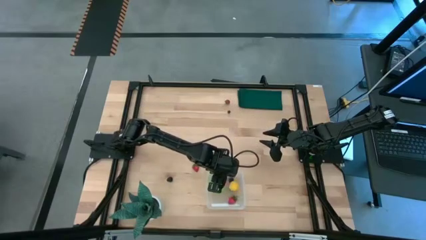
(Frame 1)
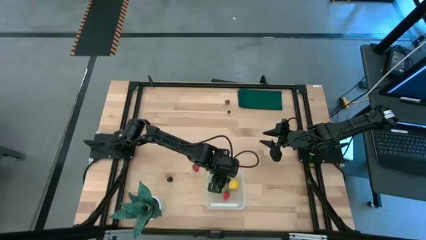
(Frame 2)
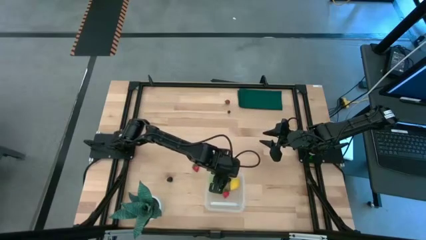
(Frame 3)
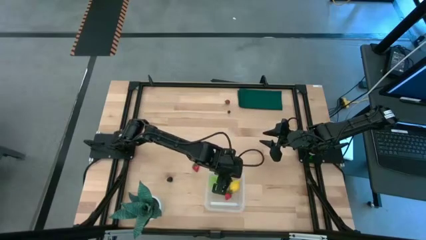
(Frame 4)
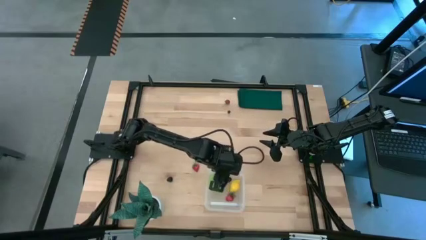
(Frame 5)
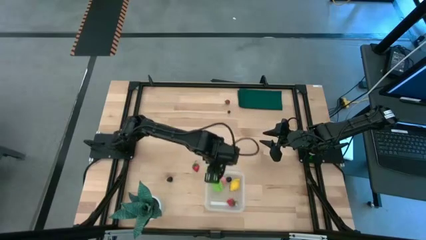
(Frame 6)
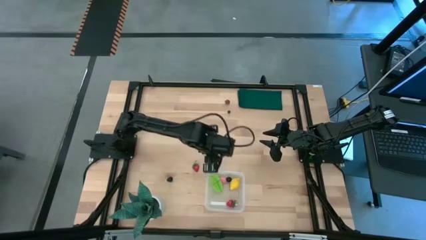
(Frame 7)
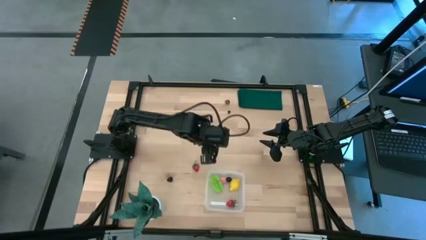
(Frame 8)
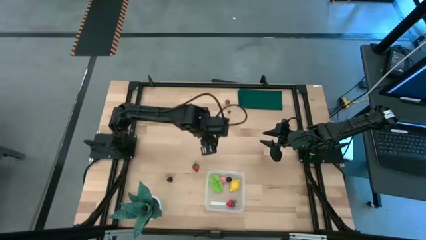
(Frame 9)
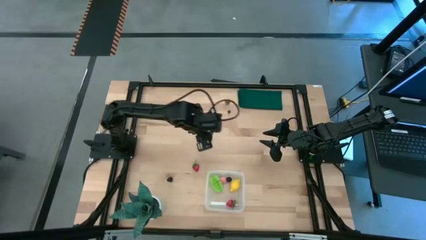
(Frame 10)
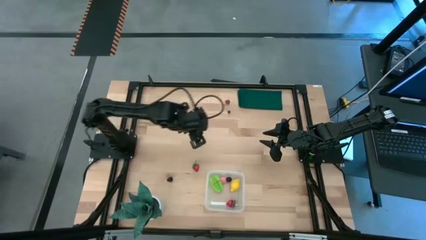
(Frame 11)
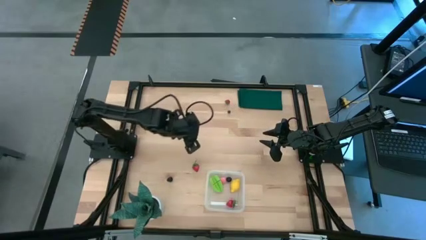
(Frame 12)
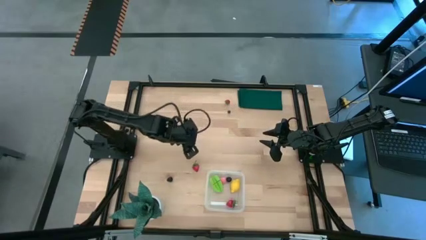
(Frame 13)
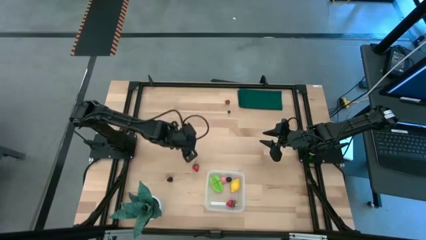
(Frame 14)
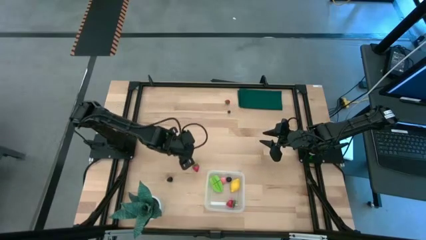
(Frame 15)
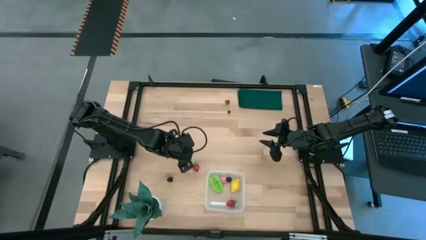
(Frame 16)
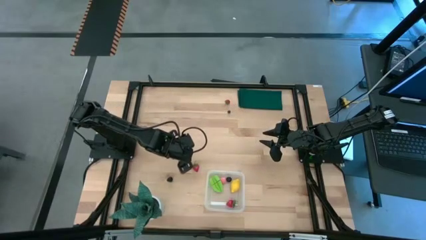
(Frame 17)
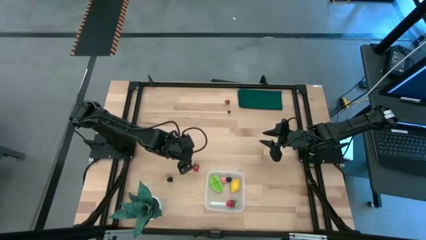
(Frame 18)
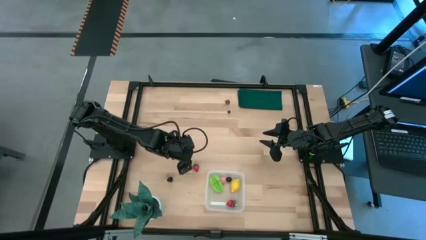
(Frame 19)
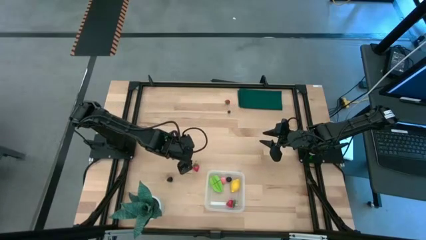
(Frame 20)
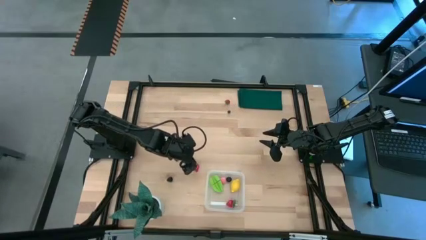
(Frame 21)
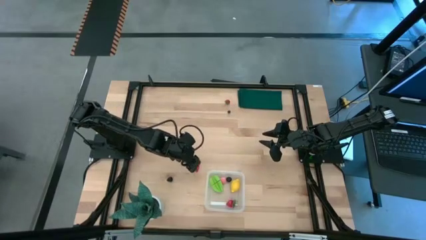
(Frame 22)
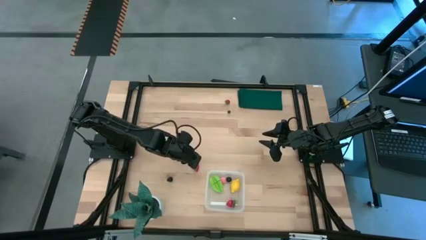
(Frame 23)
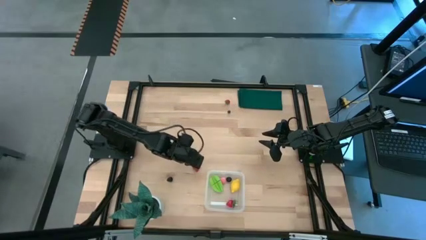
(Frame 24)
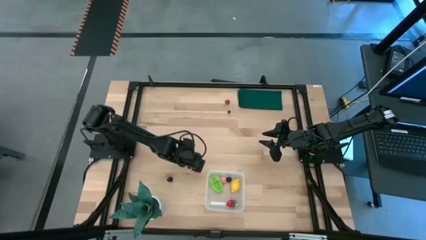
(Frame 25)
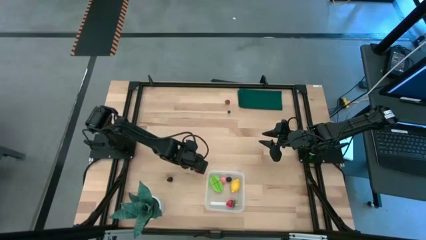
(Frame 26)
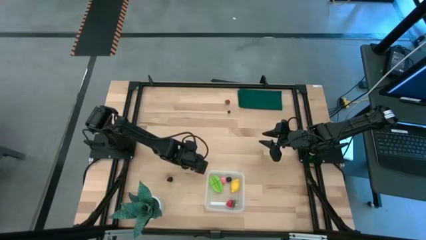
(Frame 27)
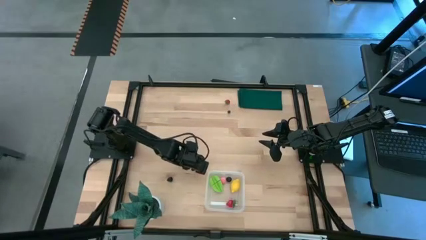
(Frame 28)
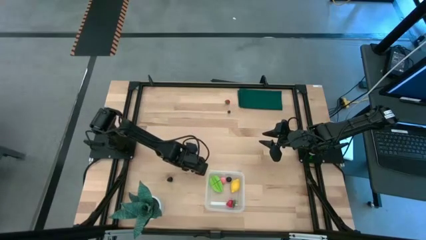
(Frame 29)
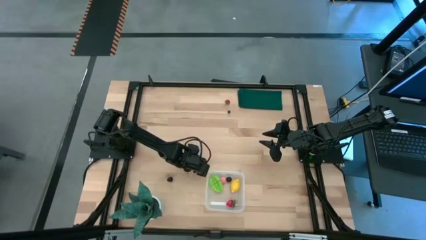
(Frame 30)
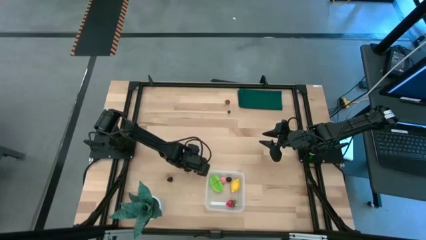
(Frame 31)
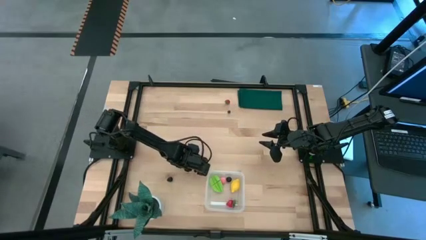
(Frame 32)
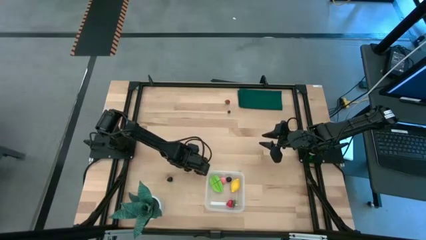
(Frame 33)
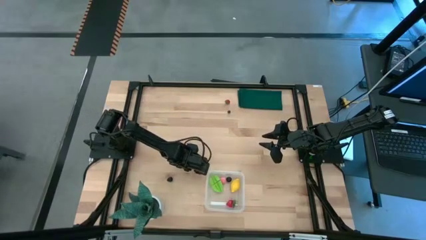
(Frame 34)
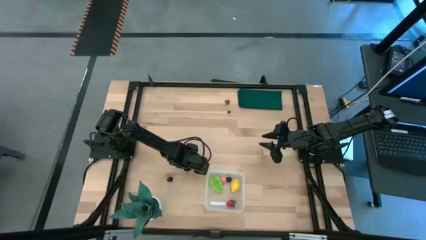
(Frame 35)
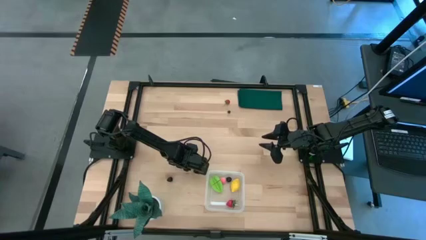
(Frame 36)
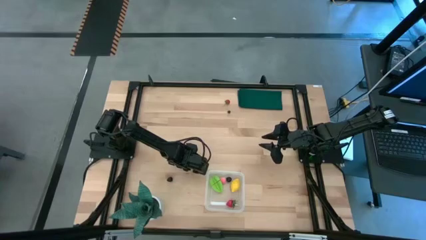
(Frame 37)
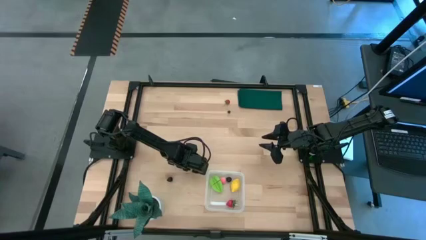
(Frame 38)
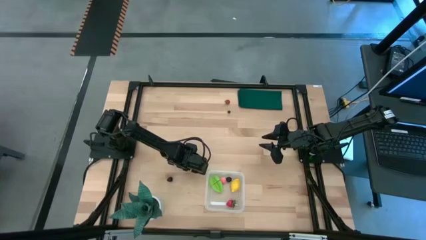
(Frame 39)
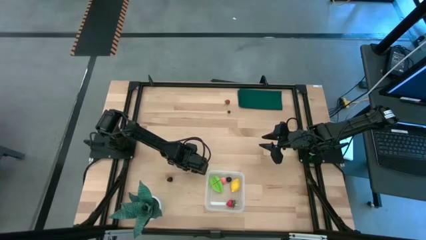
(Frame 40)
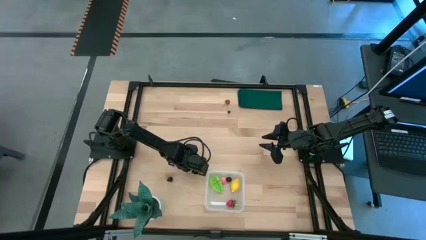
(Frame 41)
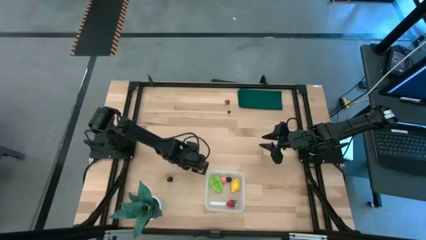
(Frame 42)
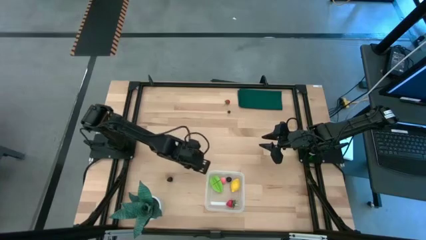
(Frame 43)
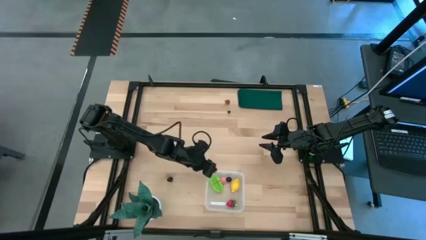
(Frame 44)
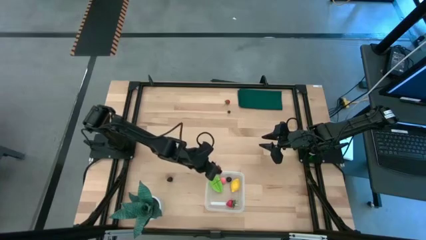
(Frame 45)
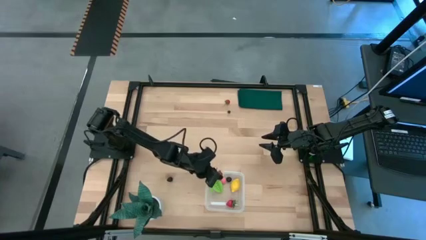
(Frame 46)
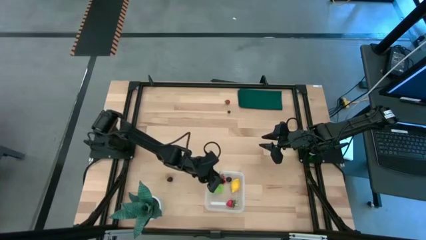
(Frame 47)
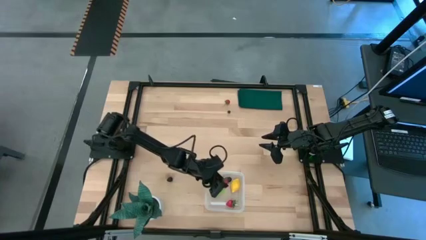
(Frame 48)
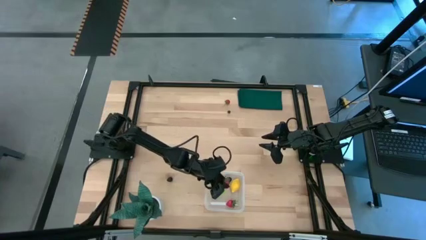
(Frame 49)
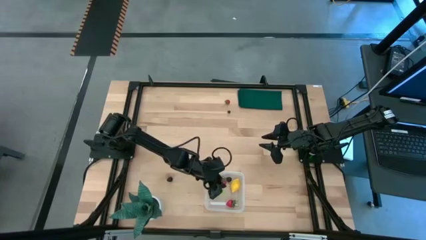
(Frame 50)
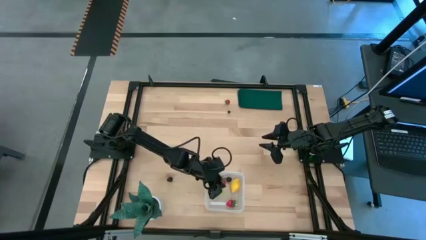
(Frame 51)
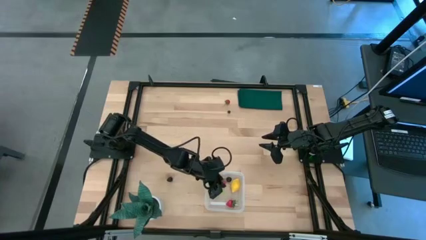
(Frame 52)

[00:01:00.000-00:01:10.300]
Task: Pick and placing Produce into tupperware
Put the bottom red strawberry into the transparent bin

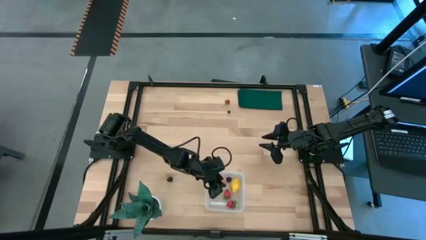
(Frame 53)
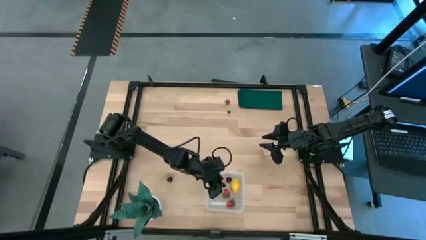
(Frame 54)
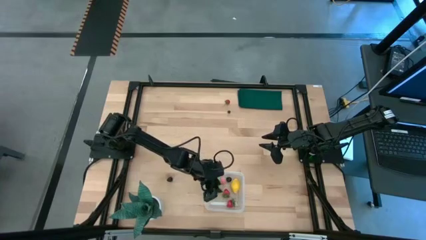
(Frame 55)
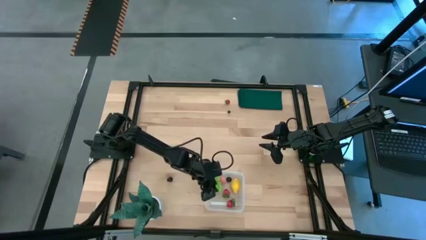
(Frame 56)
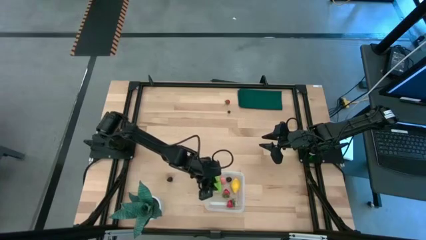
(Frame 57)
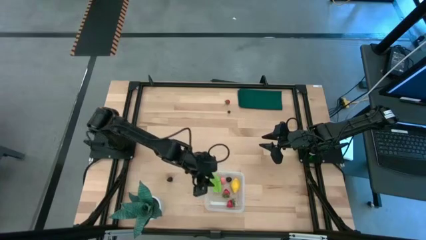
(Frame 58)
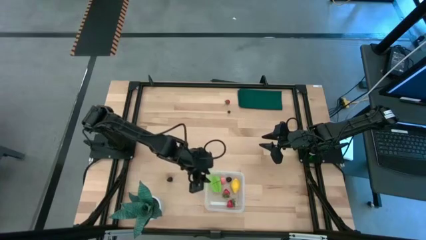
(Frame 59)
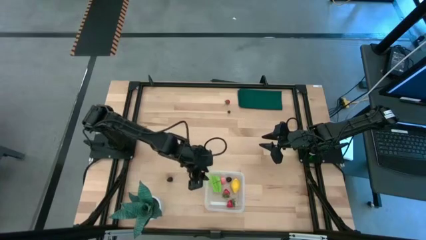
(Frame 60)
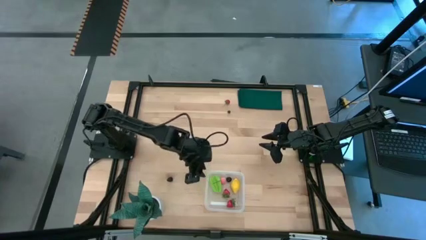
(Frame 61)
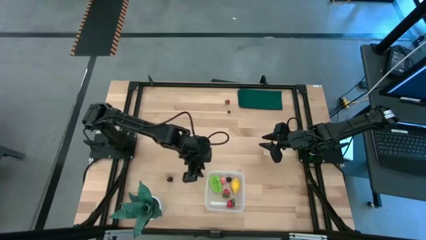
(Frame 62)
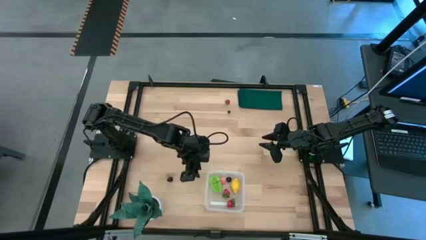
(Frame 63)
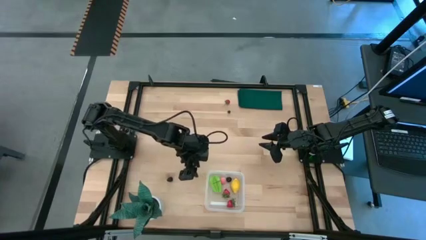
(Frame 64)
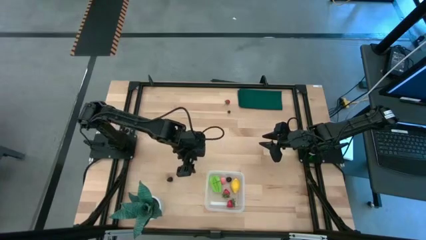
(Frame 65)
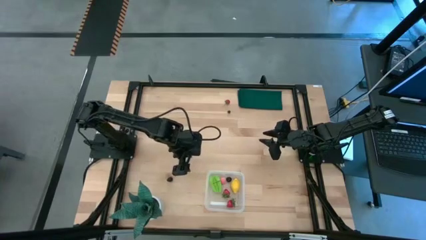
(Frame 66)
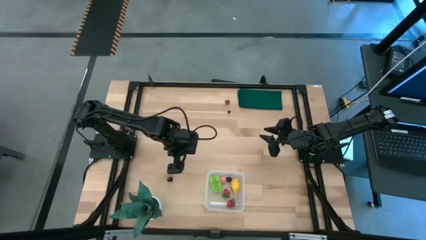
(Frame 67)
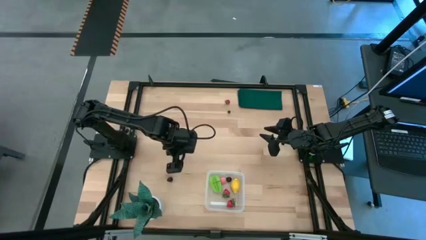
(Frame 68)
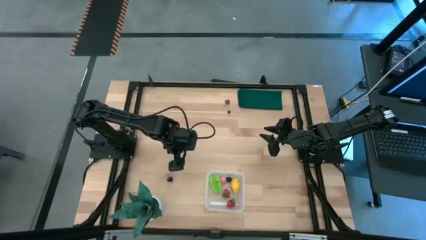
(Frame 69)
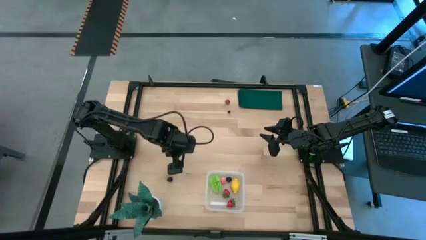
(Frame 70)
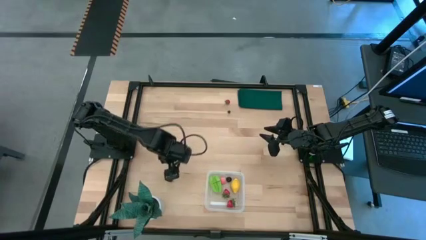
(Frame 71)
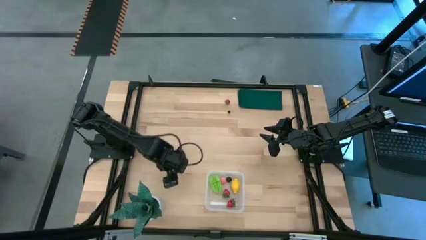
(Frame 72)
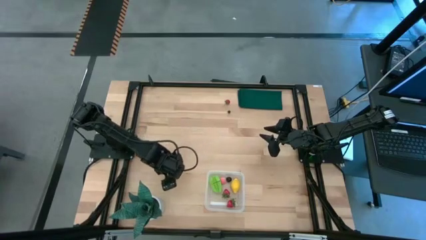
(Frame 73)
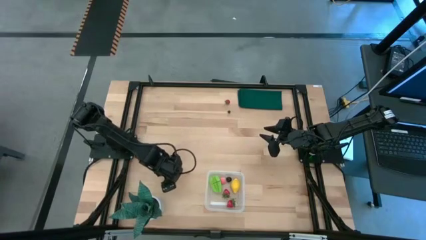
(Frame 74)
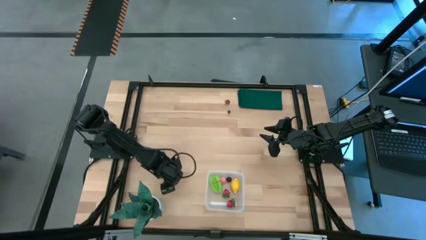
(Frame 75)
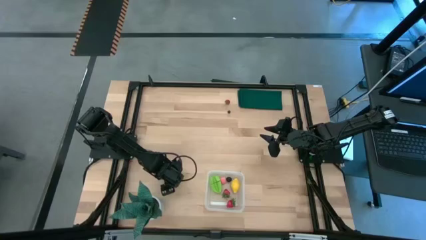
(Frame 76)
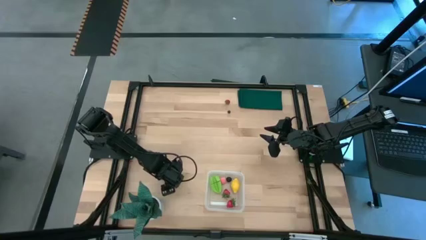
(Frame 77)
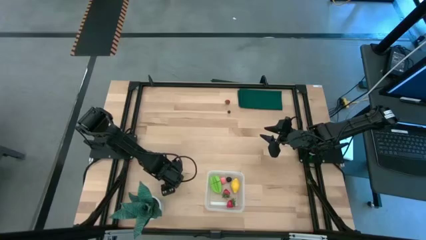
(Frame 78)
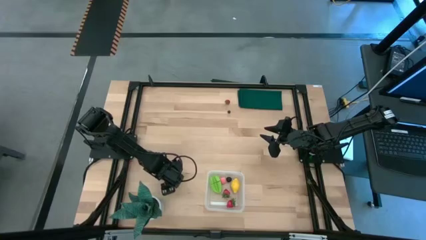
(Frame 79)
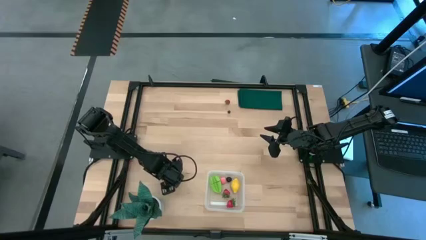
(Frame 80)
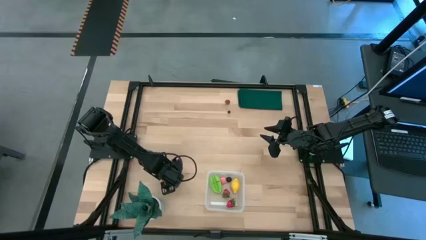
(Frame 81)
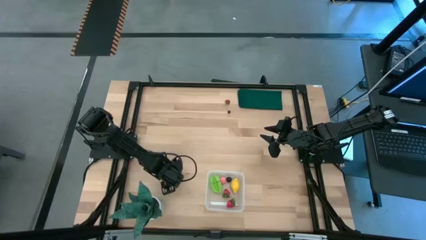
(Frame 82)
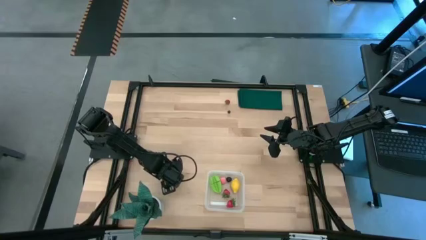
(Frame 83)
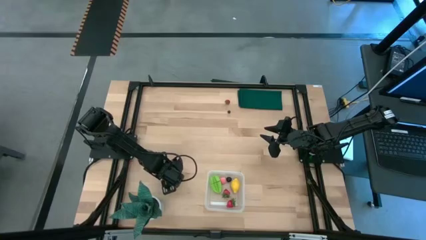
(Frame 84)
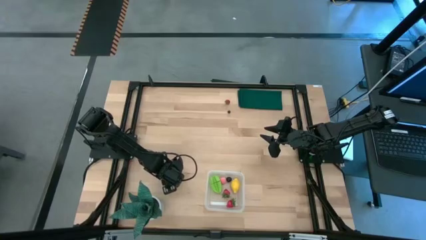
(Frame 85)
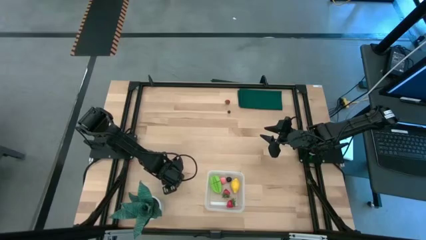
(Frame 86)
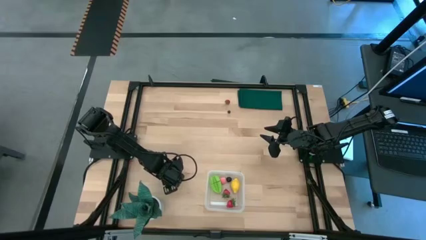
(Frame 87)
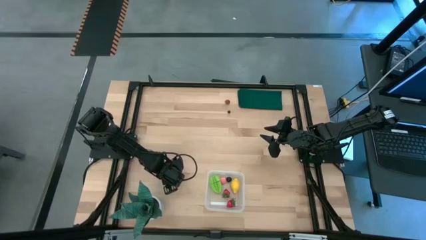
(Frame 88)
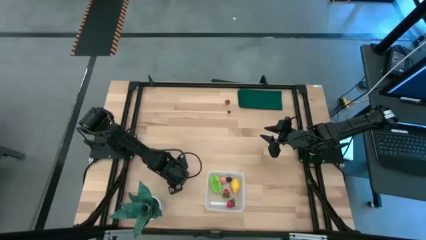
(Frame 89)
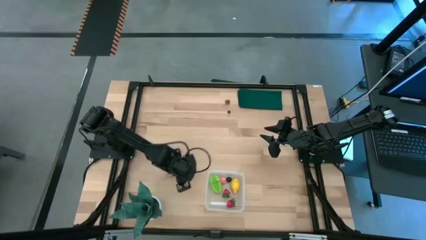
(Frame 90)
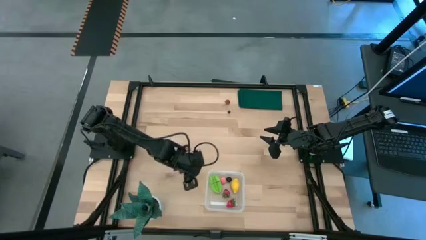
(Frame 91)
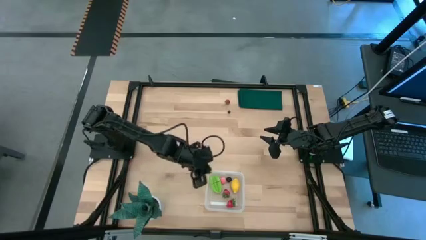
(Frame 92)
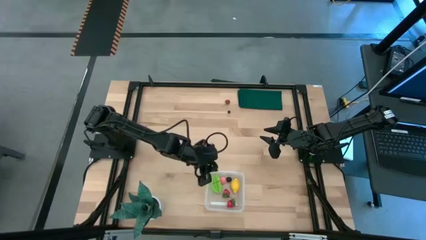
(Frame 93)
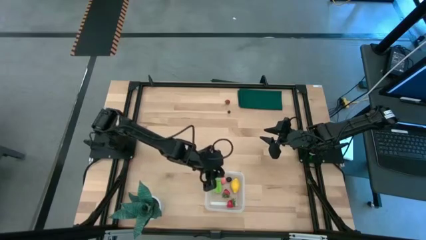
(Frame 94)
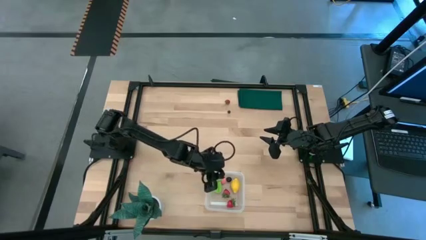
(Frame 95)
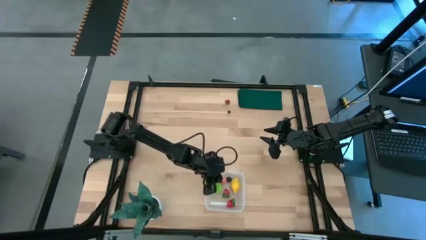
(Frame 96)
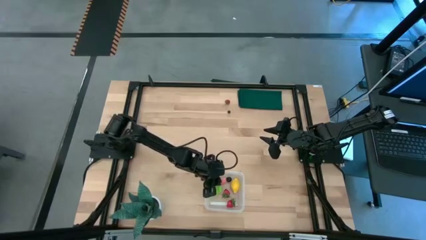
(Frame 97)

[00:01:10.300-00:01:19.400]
Put the blackberry into the transparent bin
